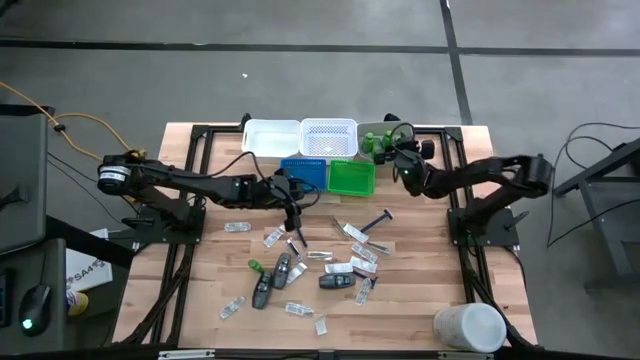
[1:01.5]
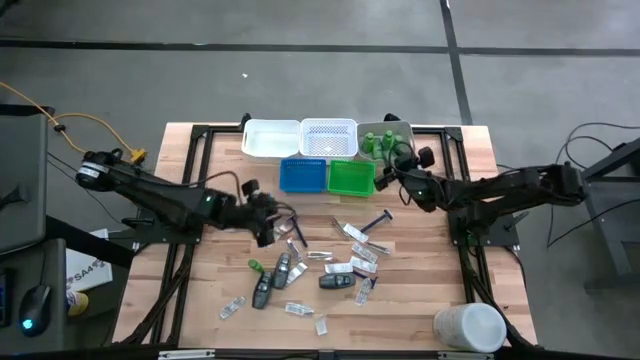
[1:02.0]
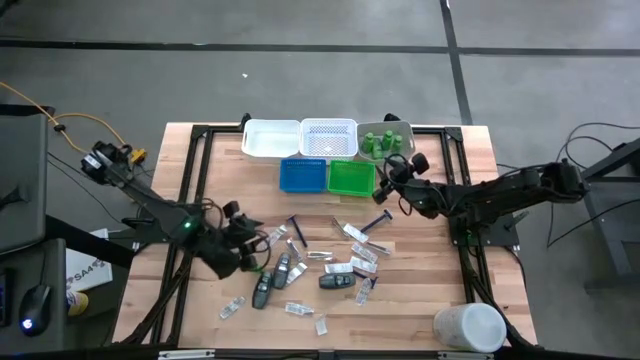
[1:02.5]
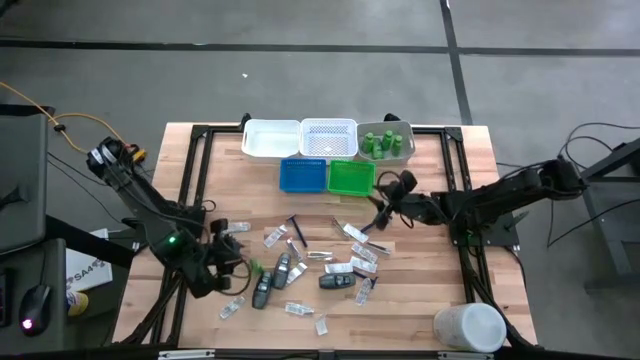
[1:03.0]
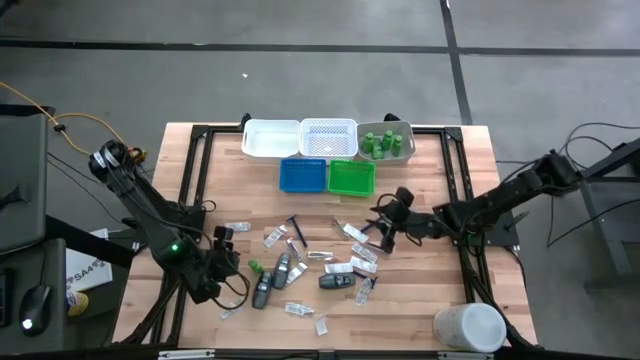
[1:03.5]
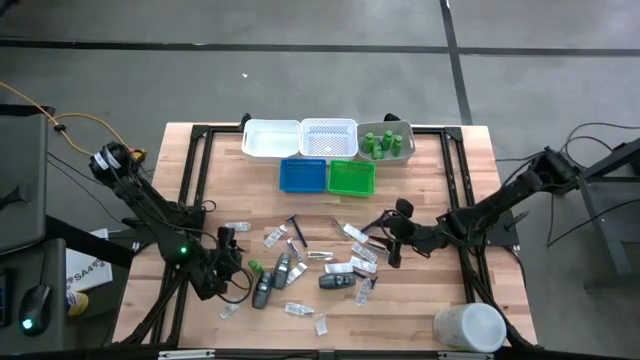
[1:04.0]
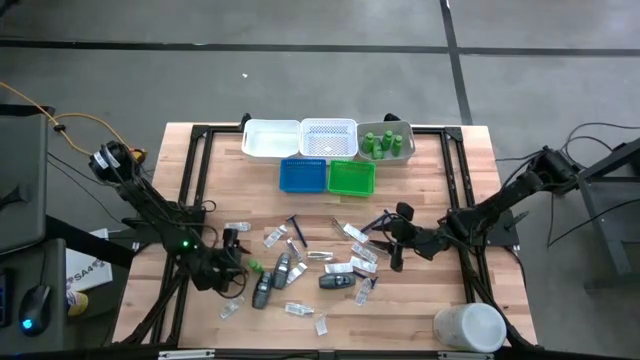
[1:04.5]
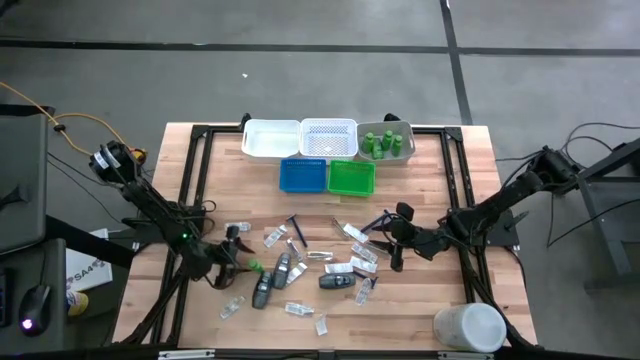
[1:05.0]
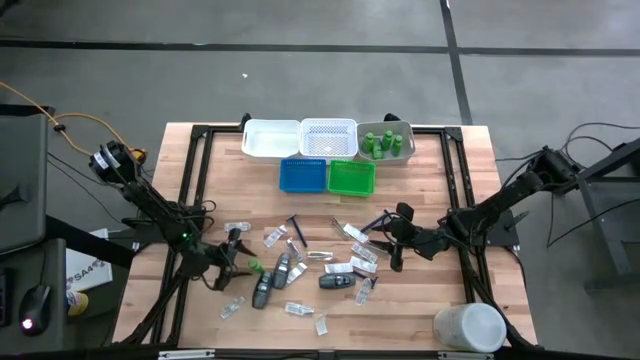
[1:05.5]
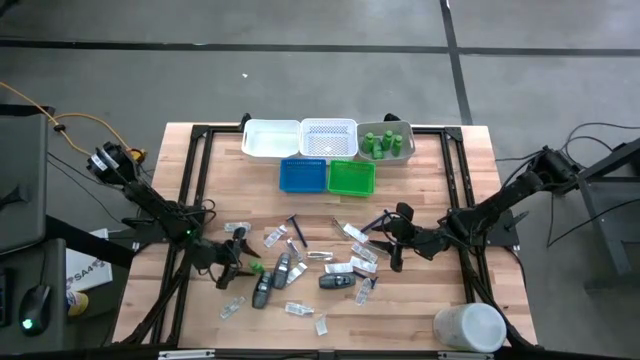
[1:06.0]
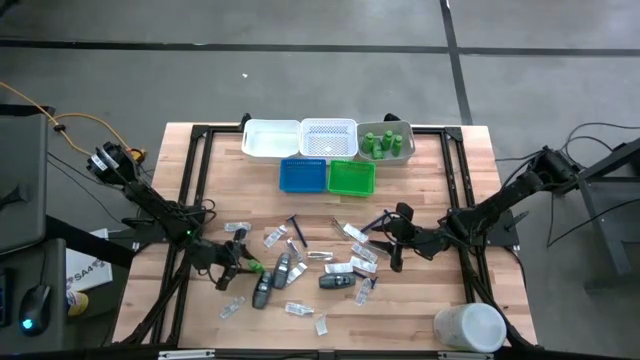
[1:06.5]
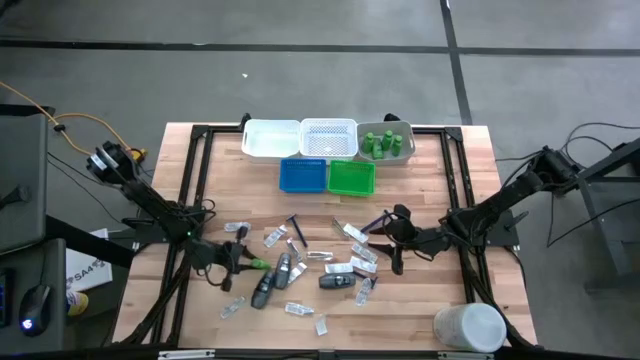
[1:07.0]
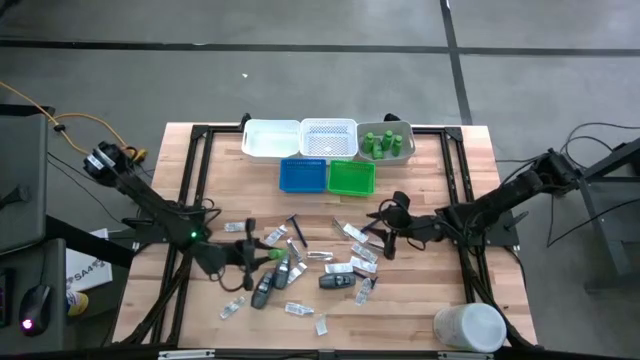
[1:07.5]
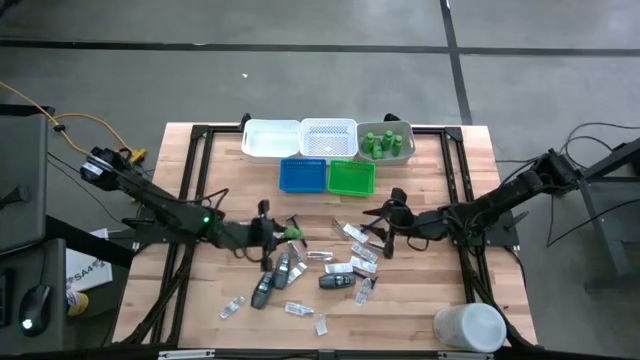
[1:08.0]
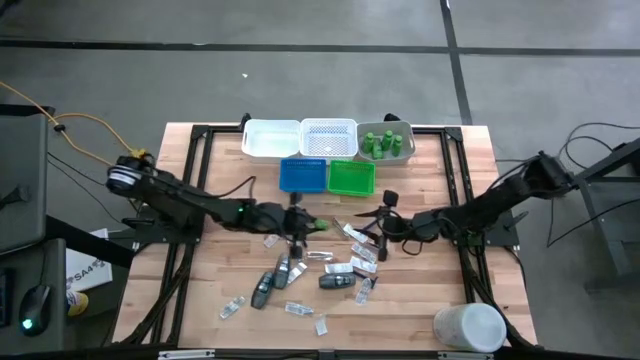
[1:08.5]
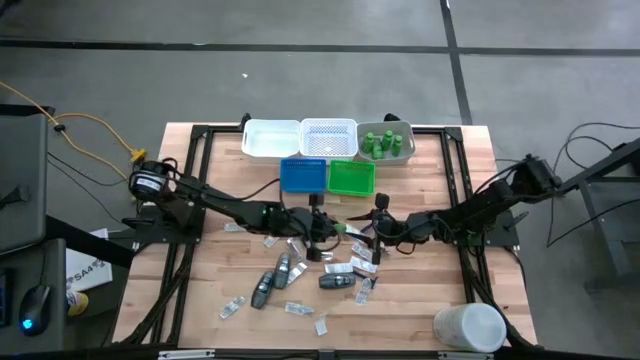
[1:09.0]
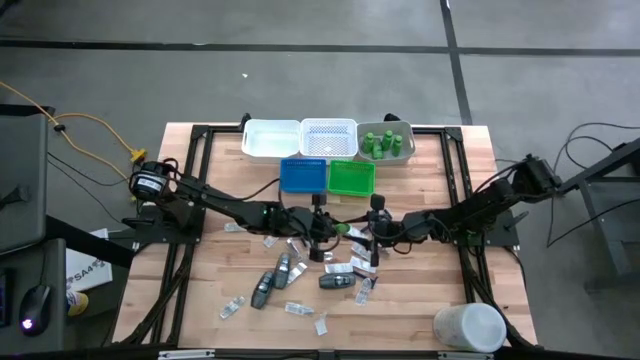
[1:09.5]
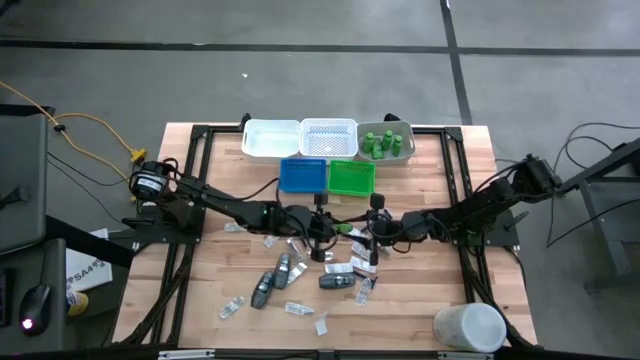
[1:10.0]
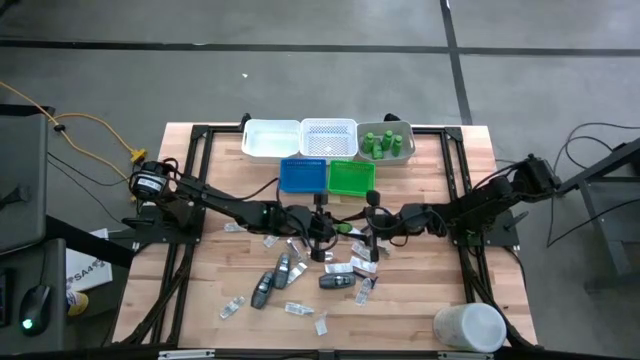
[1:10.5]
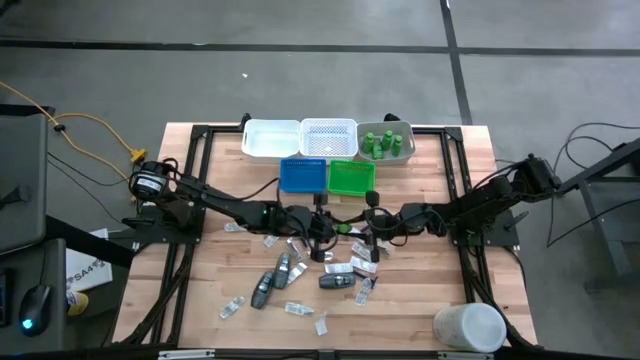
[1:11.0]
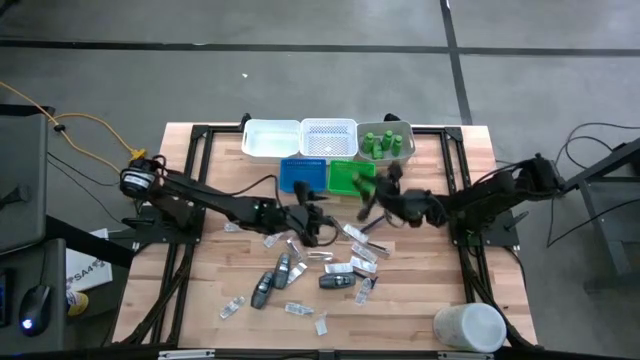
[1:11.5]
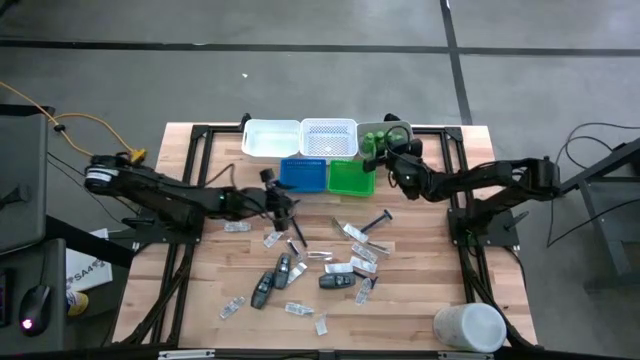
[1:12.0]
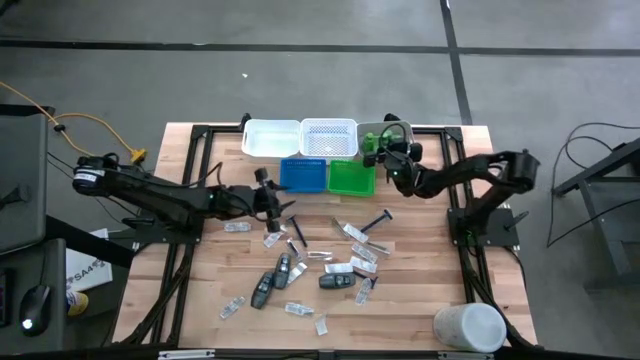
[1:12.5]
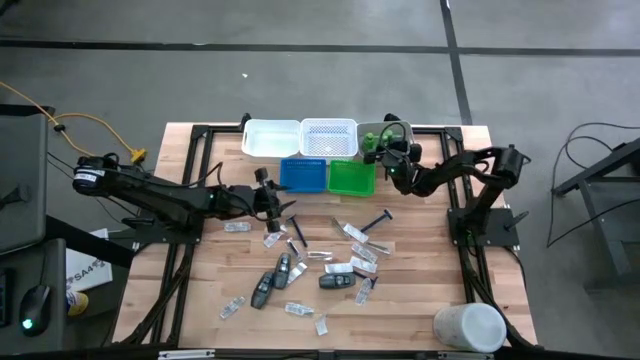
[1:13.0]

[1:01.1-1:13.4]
Task: Pick & Place Travel size toiletries
Put the green shampoo bottle into the gray bin

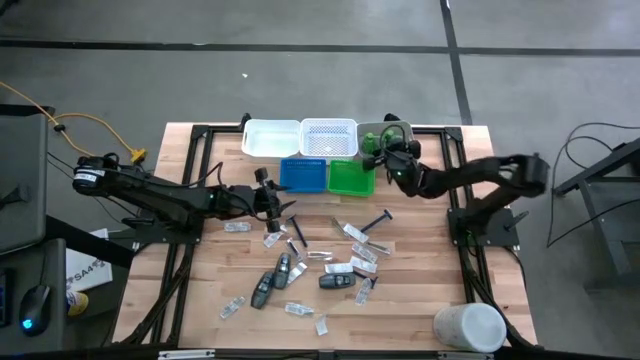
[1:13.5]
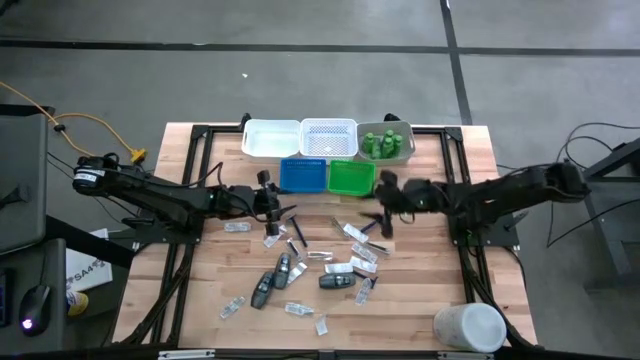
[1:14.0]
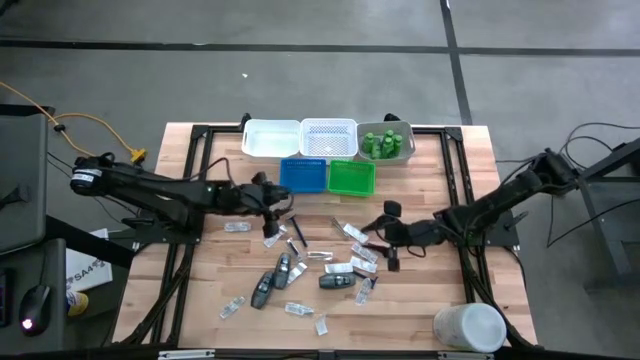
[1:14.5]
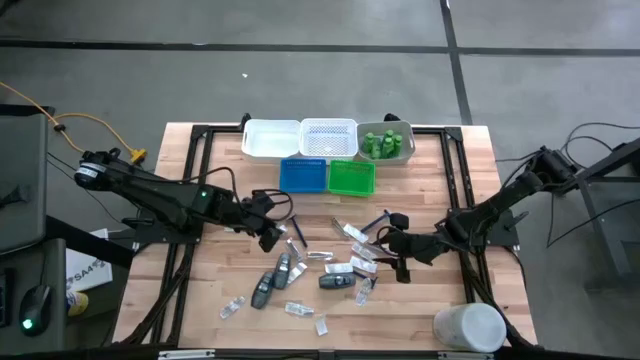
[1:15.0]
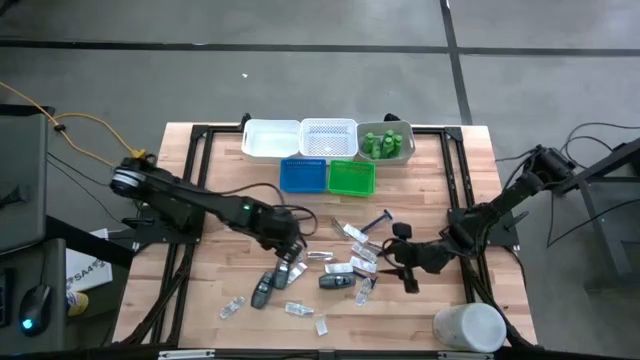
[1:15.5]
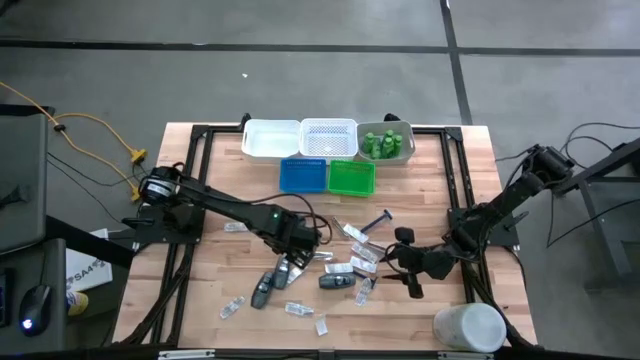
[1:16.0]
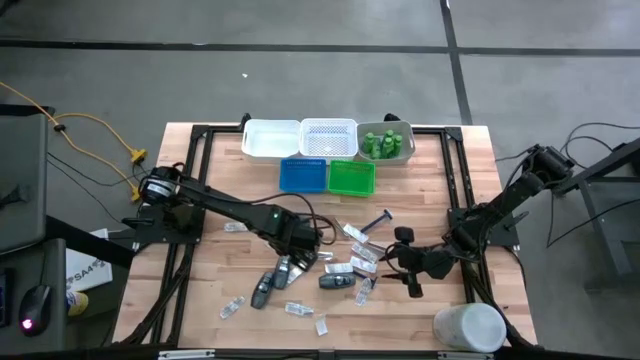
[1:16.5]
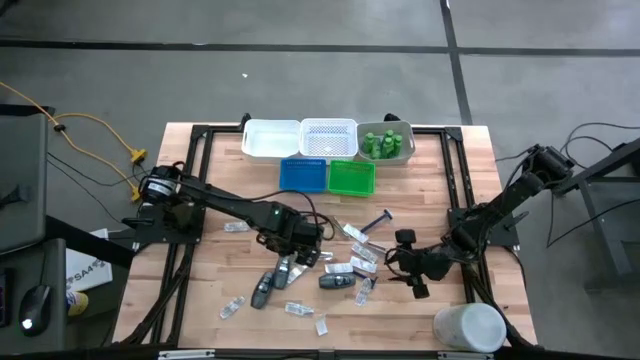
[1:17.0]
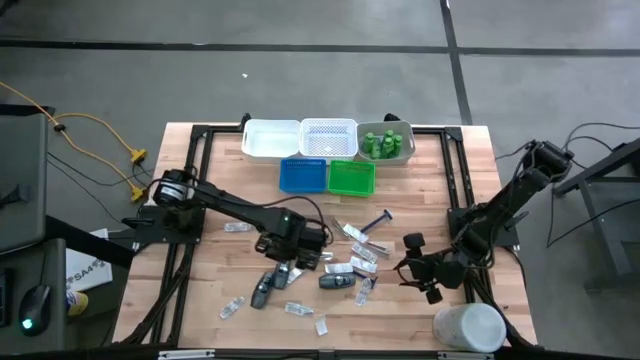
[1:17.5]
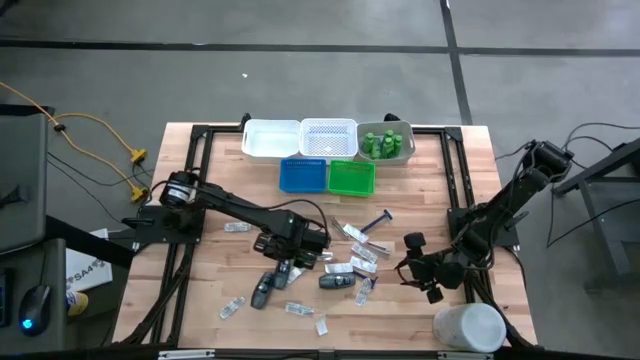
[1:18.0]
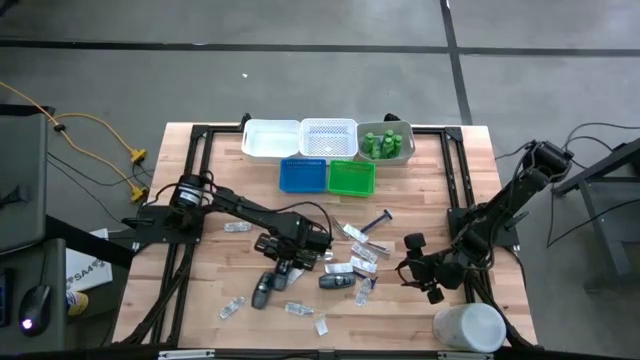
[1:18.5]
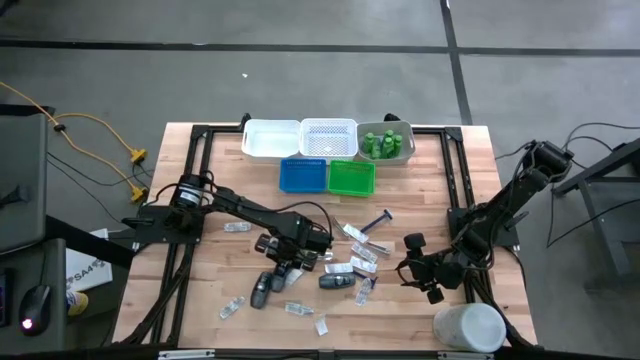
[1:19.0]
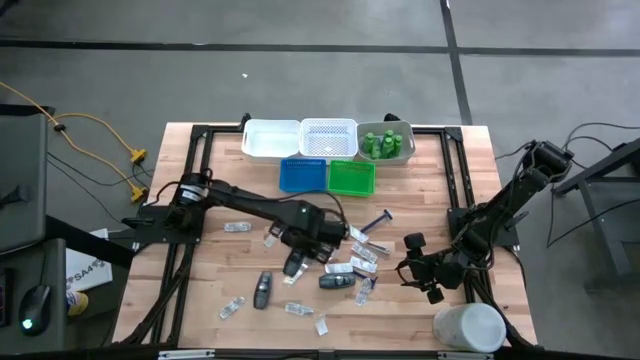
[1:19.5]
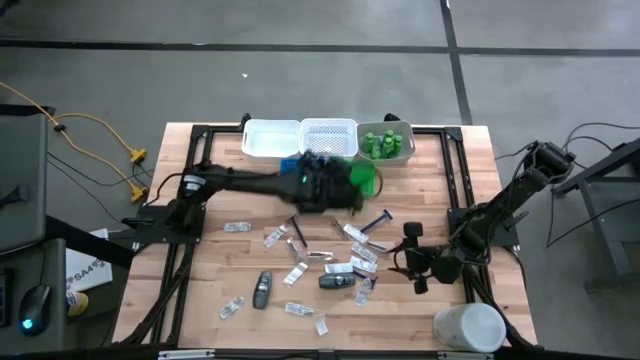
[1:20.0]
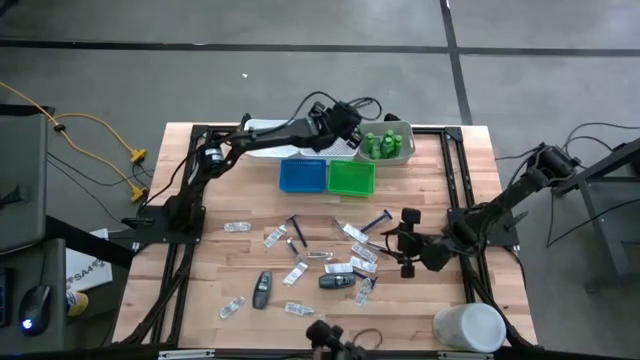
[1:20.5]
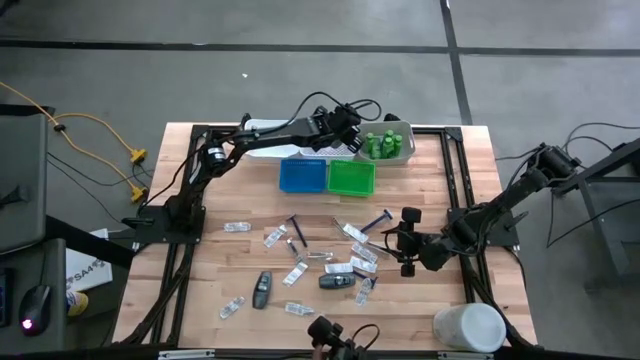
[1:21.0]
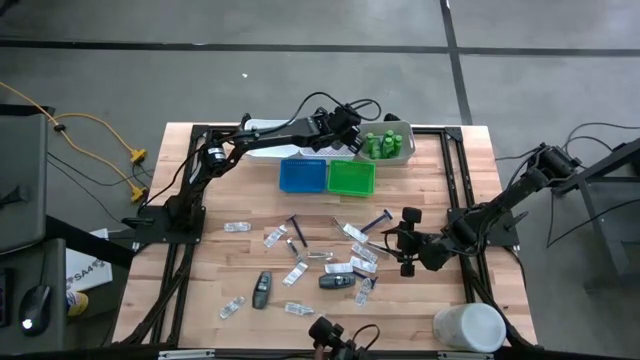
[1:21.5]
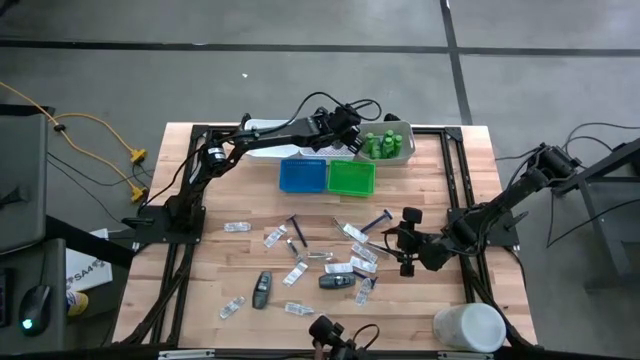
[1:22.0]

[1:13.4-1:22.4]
Put the black deodorant into the white basket

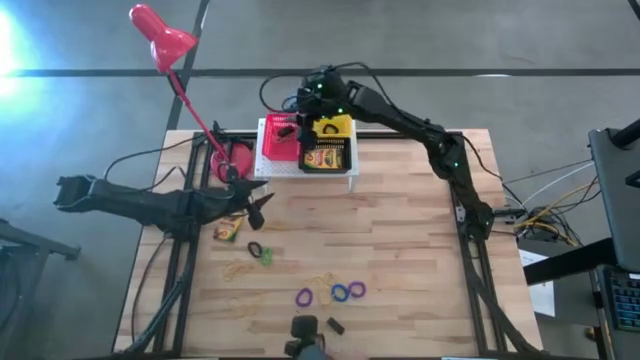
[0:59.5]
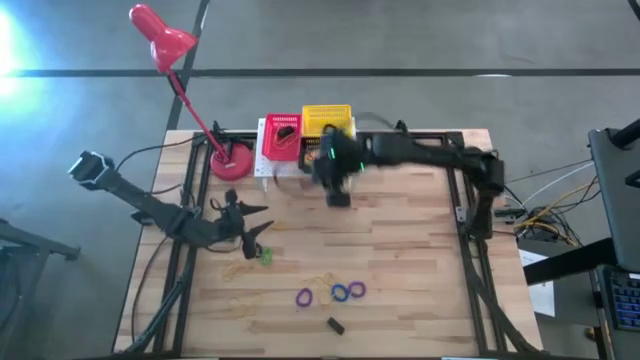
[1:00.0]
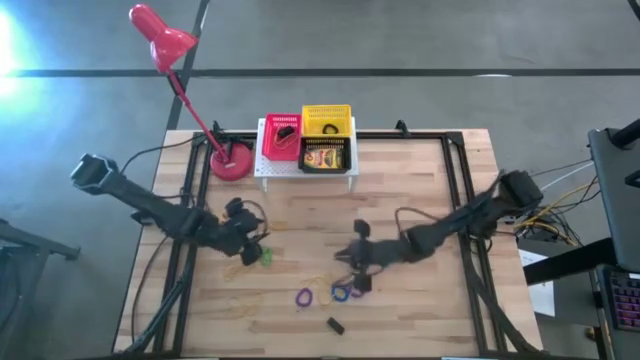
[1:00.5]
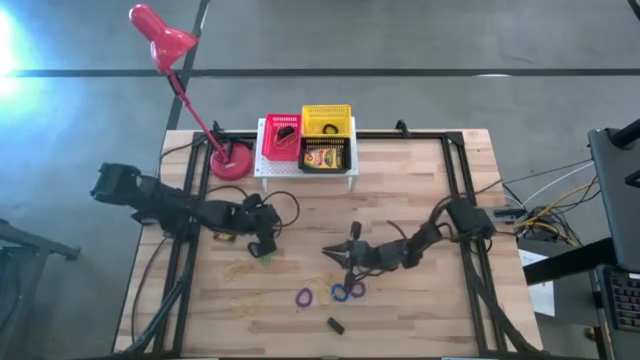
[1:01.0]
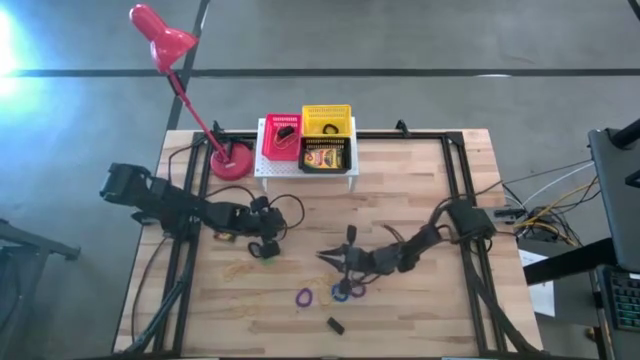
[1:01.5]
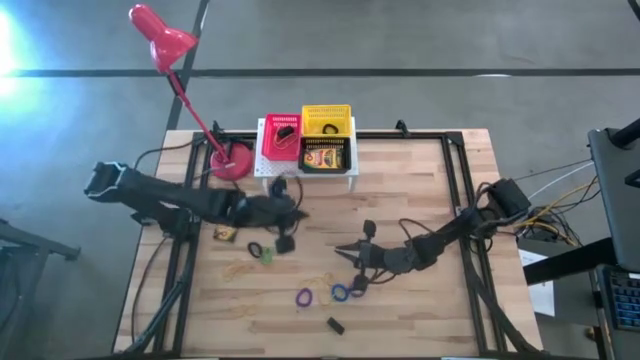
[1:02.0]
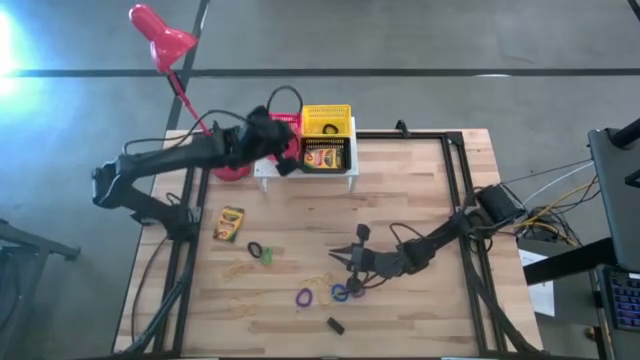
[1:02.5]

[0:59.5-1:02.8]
Task: Pick & Place Office Desk Supplies
Put the yellow rubber band into the red bin on the shelf
